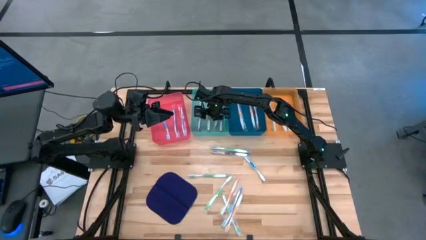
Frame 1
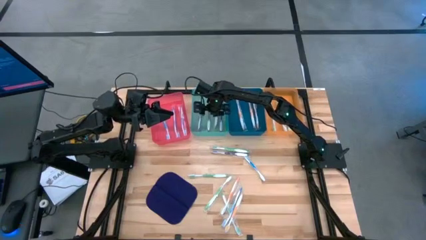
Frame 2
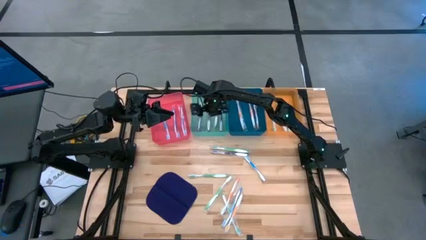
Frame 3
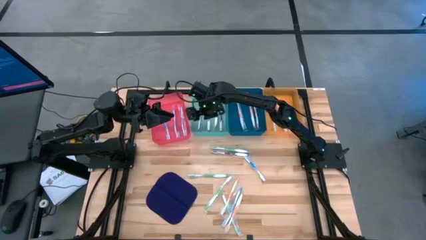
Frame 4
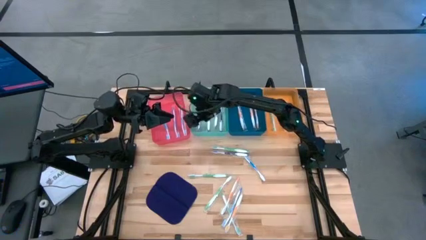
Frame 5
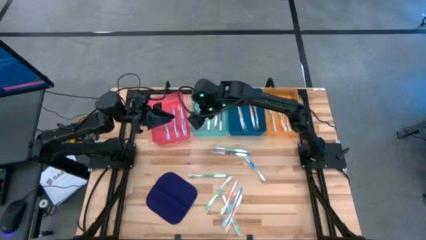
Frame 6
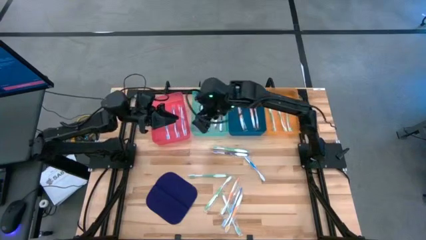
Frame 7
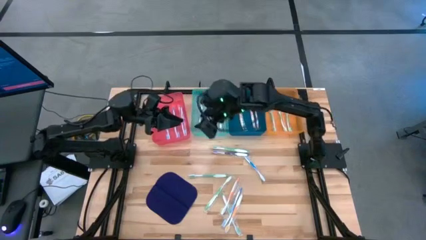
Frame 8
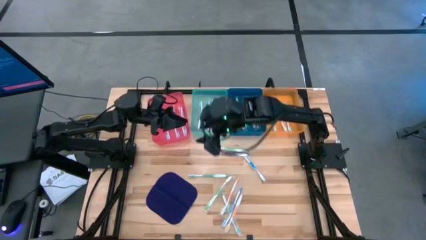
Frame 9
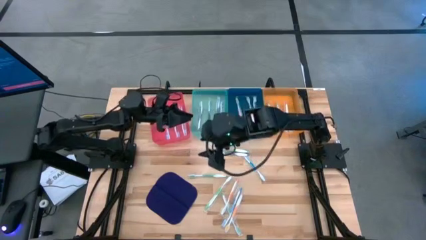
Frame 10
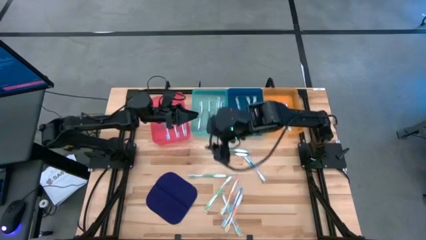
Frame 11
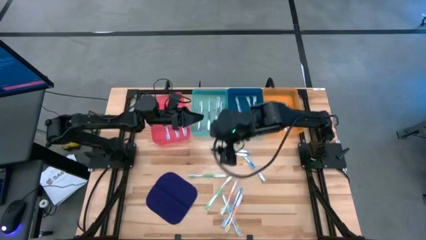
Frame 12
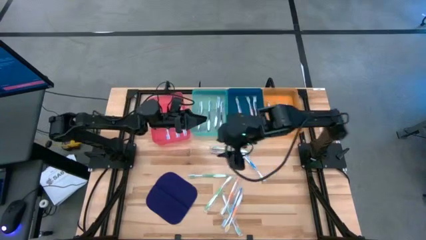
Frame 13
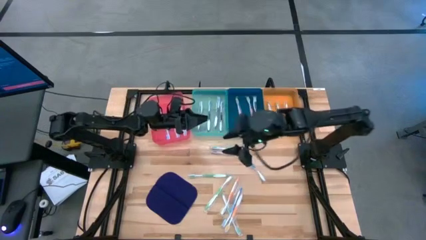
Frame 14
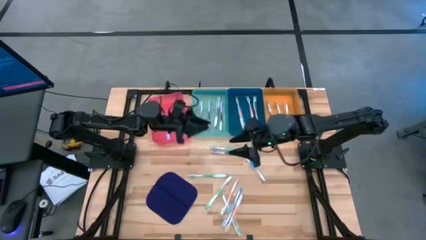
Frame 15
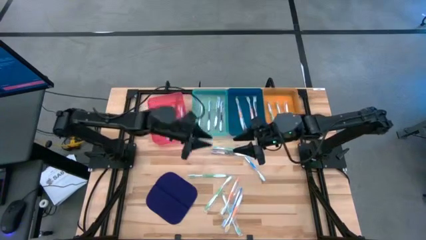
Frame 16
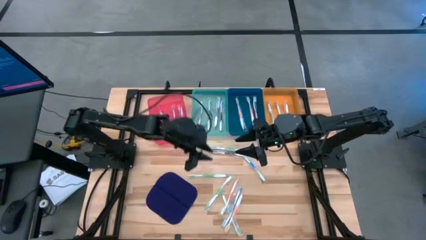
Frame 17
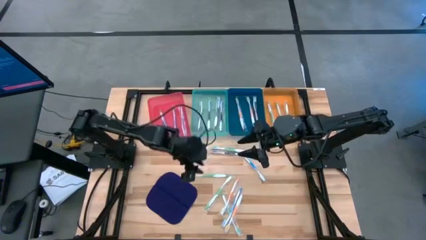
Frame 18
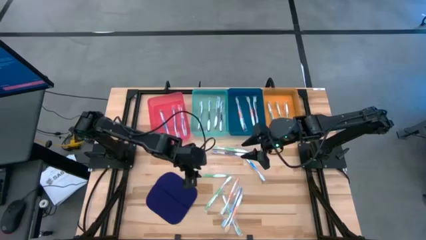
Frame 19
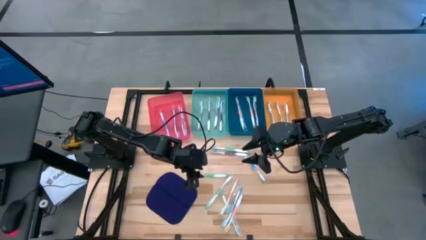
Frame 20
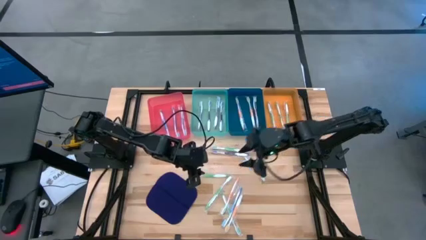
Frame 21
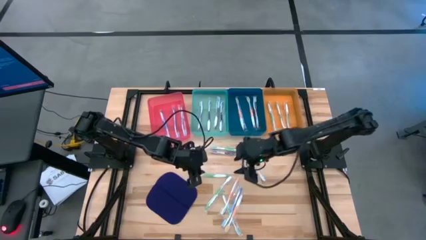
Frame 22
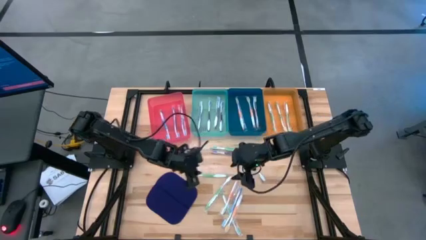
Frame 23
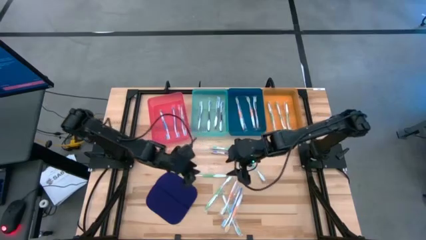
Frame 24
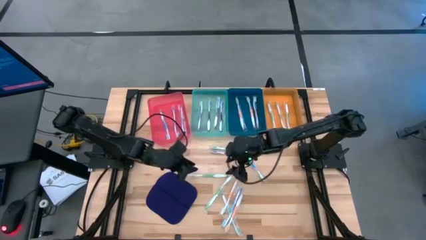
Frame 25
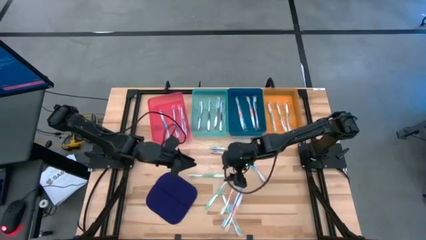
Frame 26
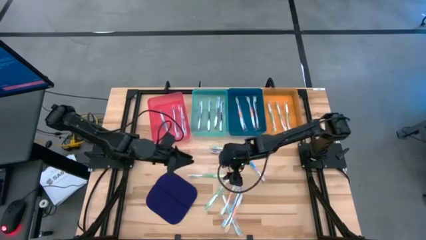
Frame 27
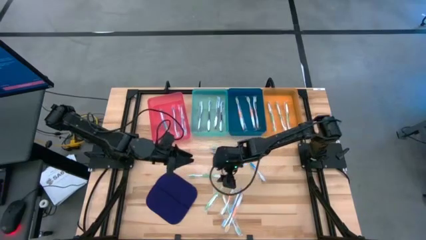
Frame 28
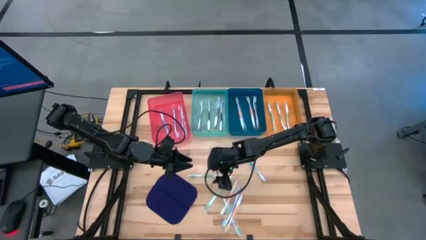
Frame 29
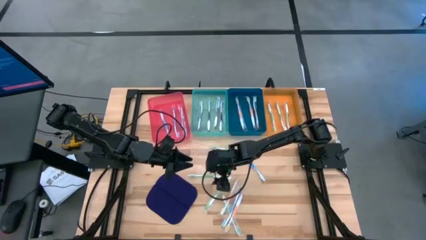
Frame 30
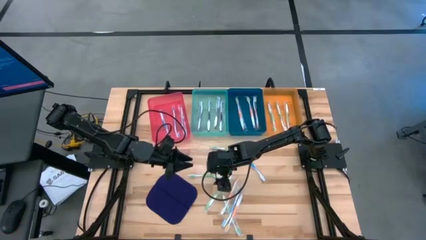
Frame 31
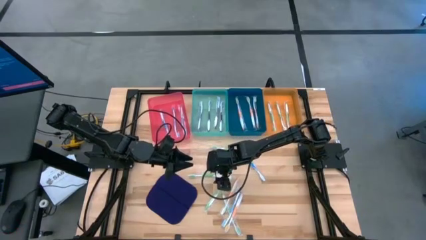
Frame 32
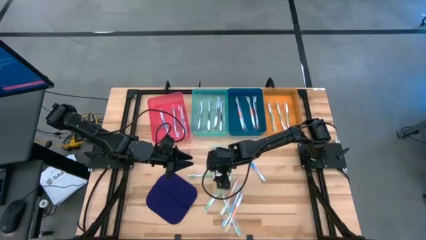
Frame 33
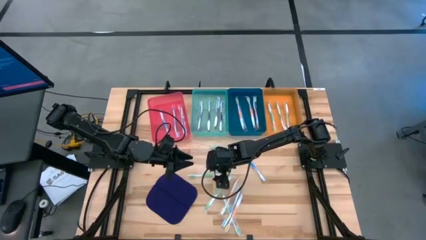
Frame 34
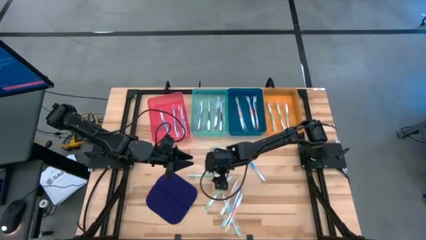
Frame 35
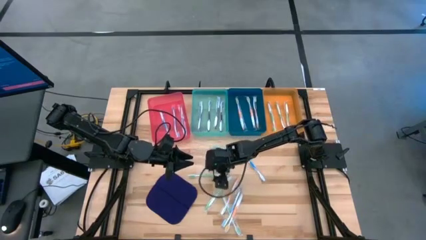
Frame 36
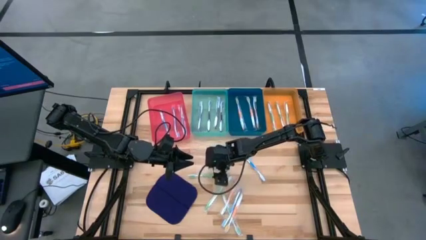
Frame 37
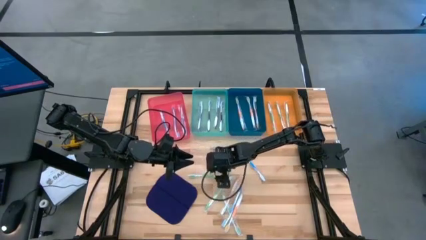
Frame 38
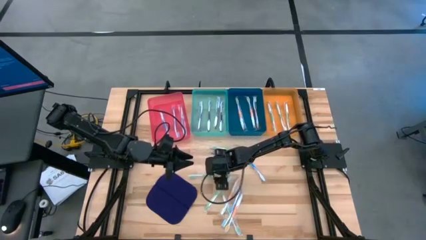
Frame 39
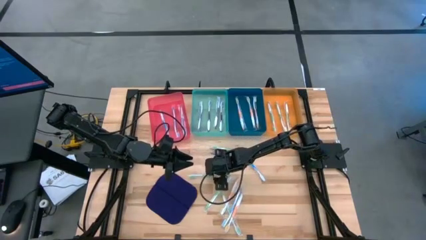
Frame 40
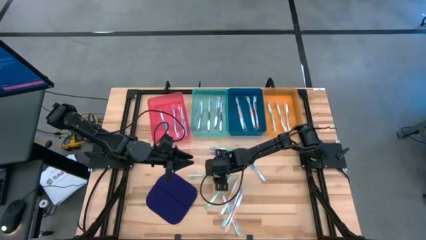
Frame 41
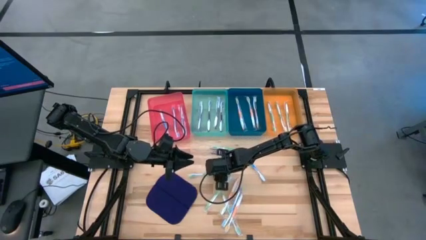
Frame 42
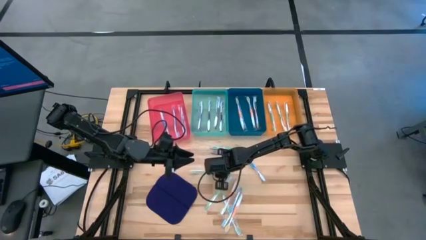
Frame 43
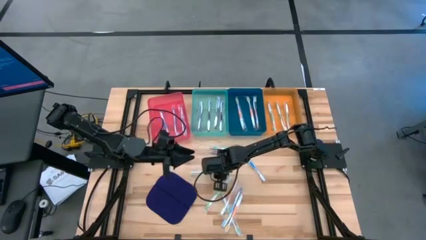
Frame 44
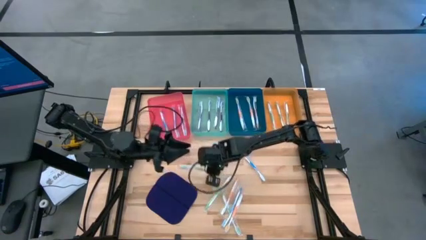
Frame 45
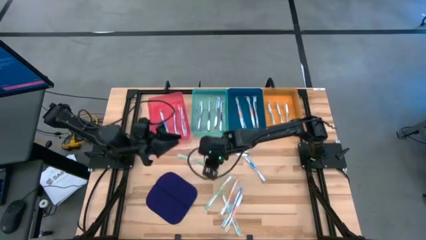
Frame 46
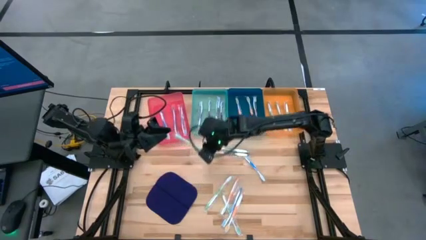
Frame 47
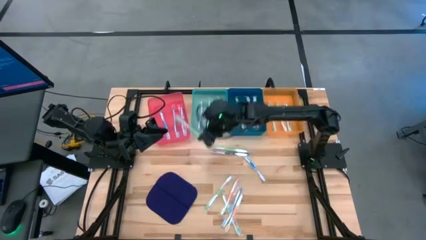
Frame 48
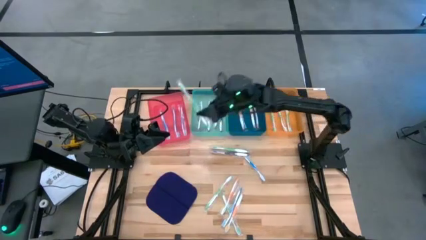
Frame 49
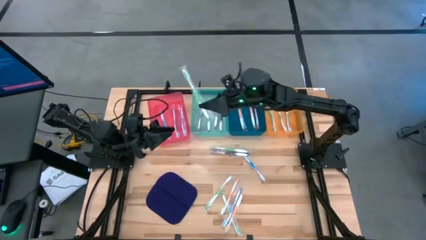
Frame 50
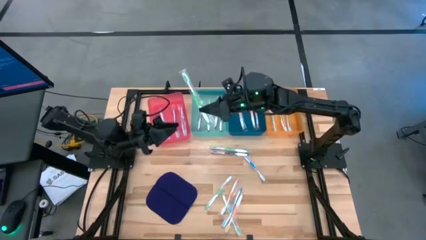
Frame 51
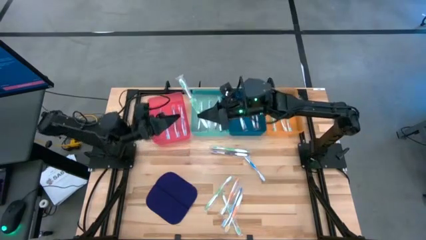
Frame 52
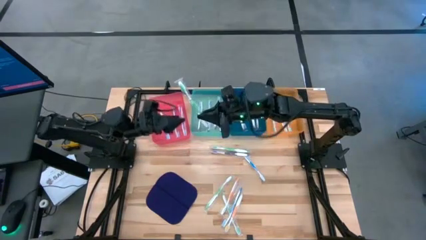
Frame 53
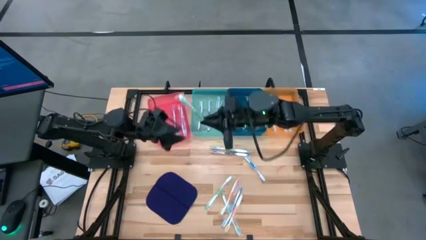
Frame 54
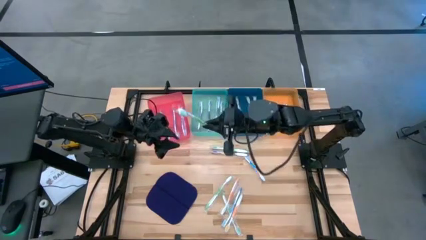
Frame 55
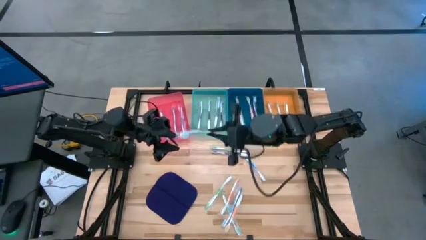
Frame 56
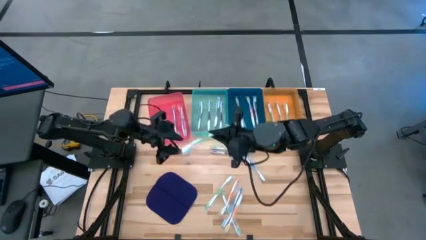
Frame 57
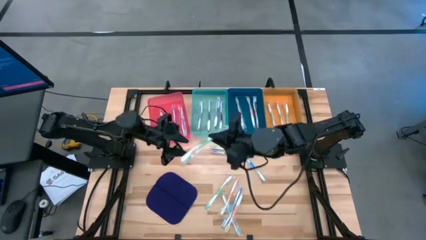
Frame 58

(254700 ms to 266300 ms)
Task: Pick & Place Toothbrushes
Put the green toothbrush into the orange bin

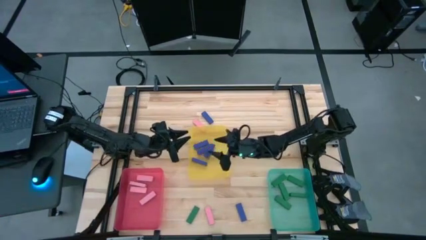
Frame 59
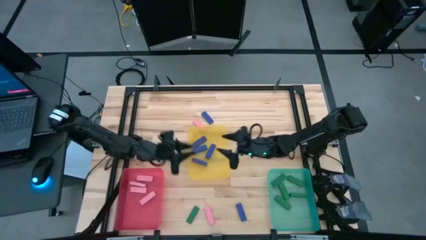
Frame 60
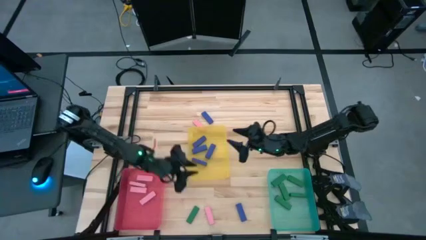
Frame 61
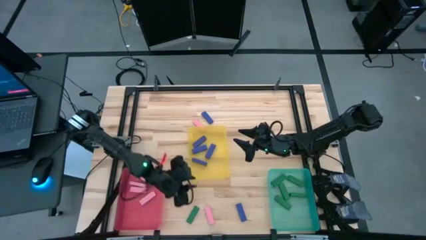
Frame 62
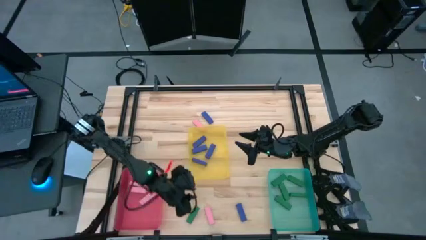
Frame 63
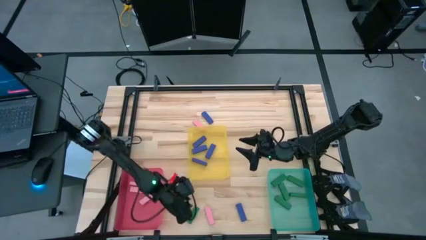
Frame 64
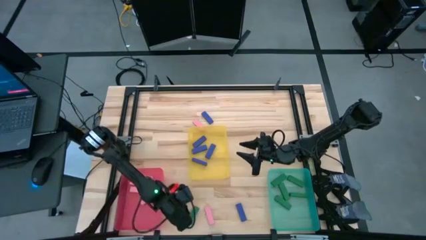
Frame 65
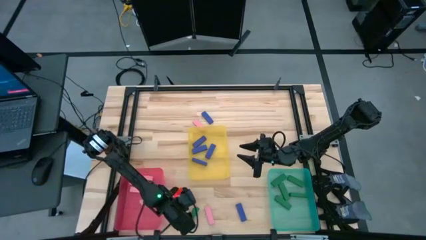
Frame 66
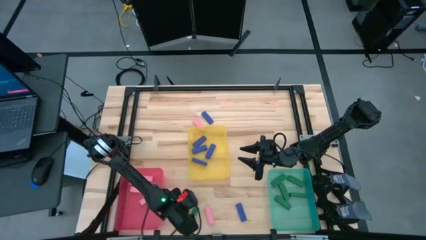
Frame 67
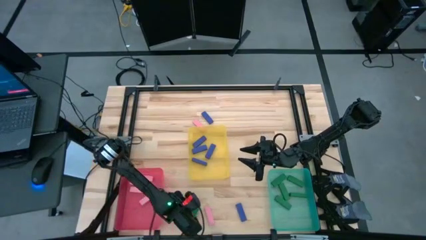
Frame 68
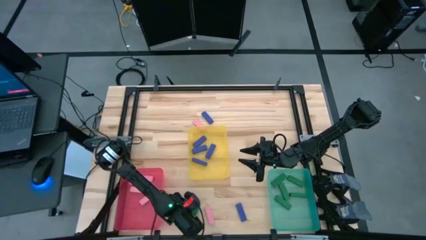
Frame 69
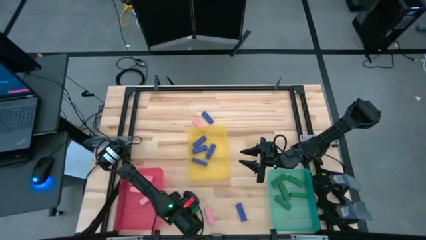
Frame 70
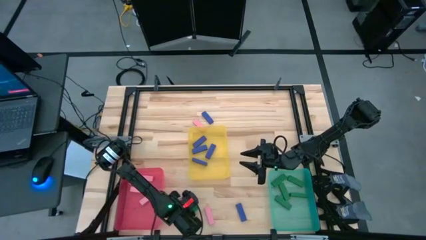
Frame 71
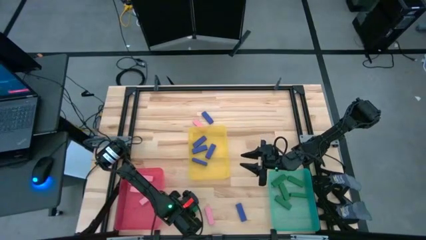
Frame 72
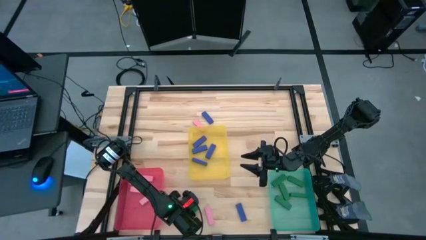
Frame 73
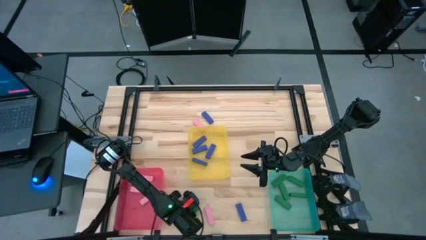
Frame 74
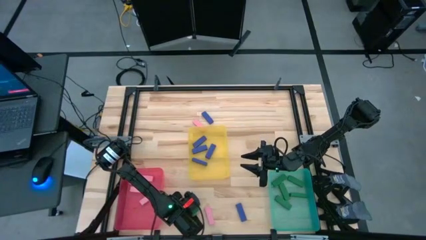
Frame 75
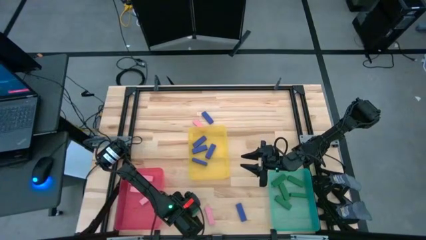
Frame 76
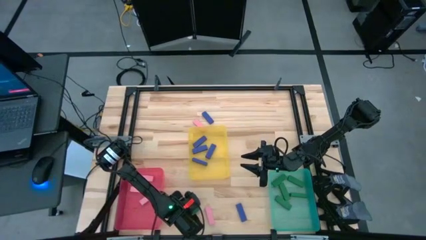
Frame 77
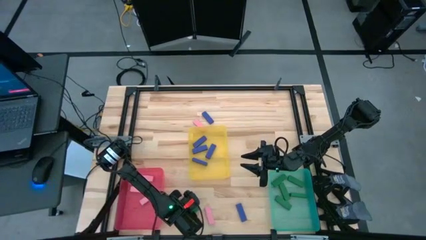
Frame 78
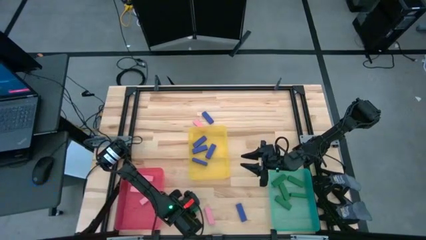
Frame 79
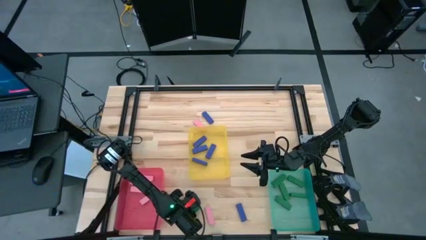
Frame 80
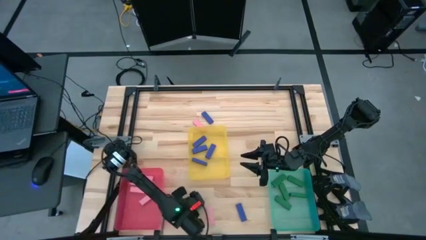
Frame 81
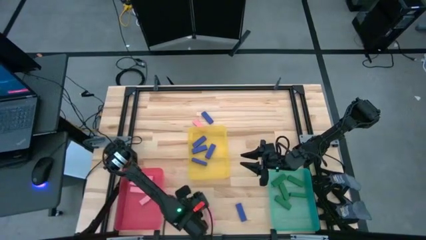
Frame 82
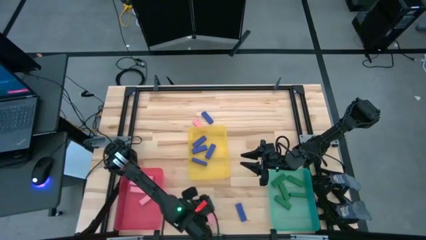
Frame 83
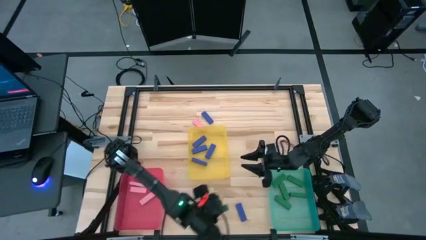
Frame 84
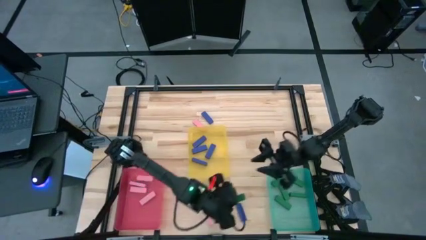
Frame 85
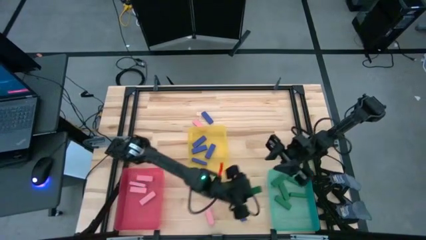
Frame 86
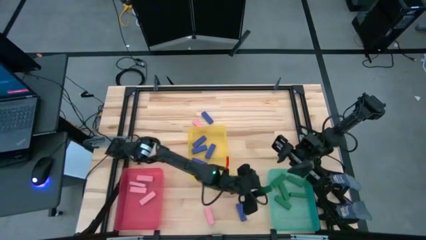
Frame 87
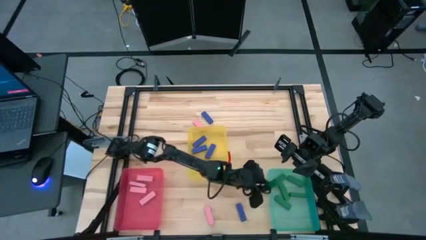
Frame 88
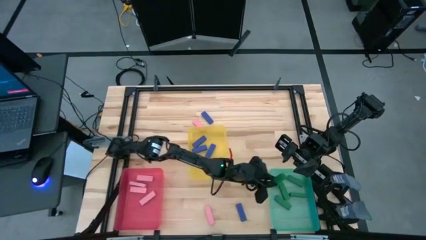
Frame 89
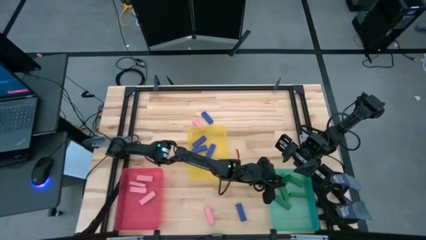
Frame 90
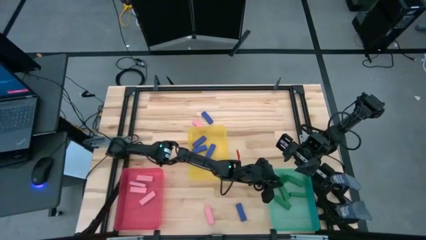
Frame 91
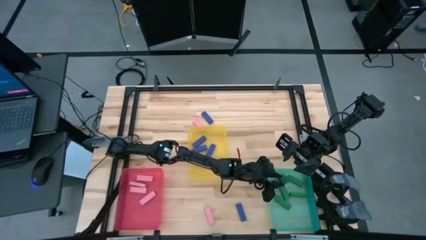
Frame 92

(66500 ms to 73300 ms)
Task: Sort blocks
Put the green block into the blue bin
